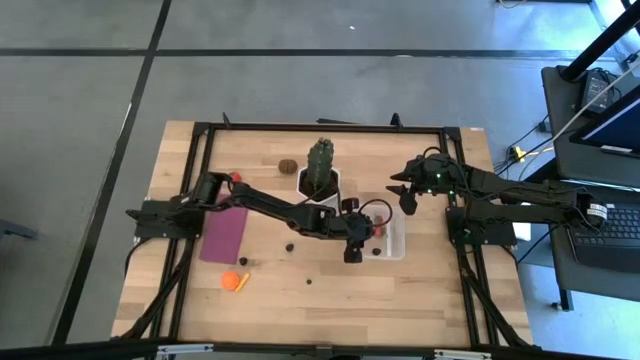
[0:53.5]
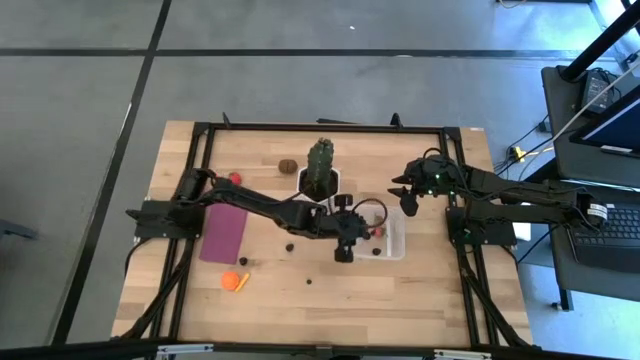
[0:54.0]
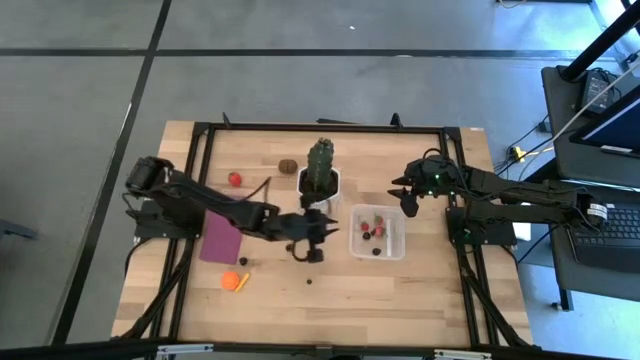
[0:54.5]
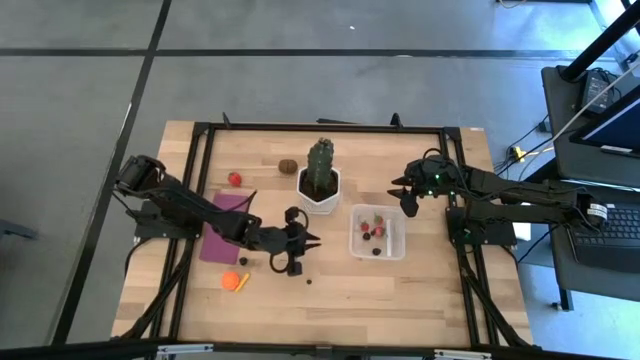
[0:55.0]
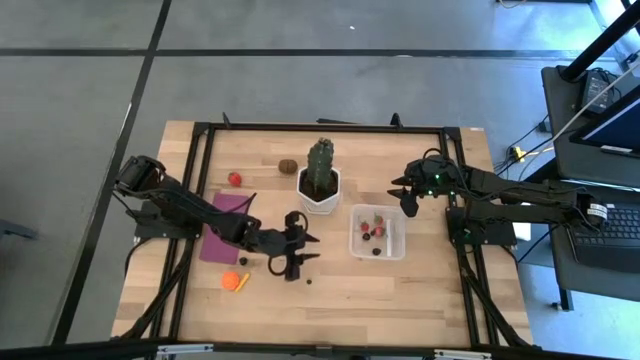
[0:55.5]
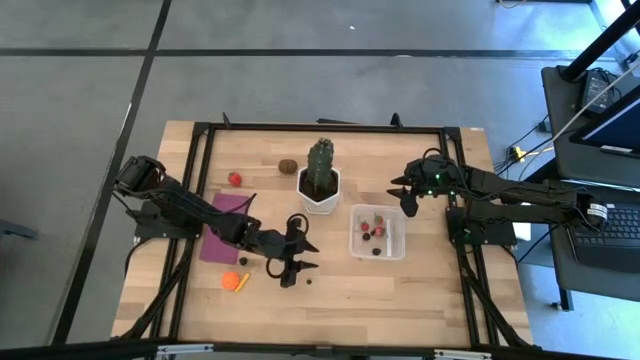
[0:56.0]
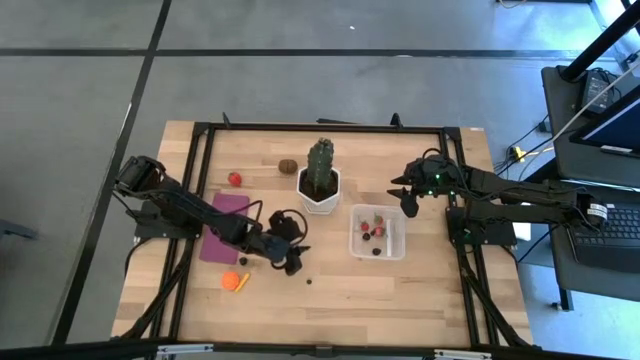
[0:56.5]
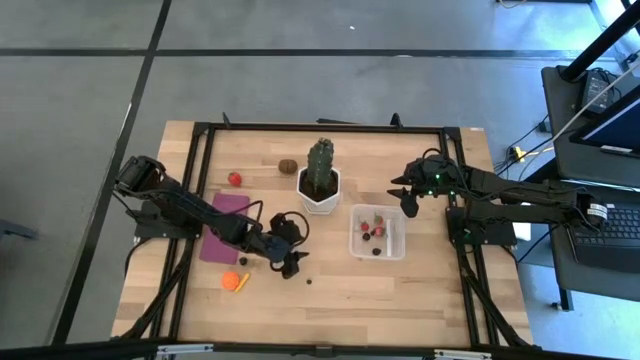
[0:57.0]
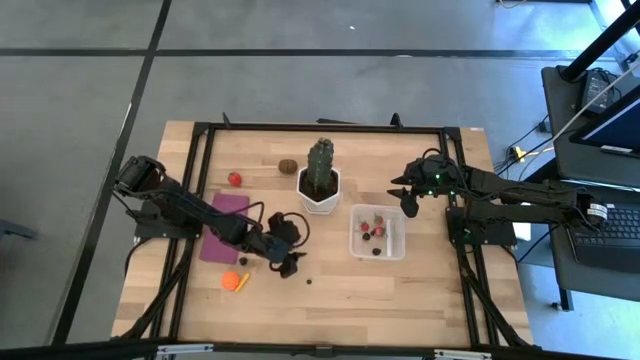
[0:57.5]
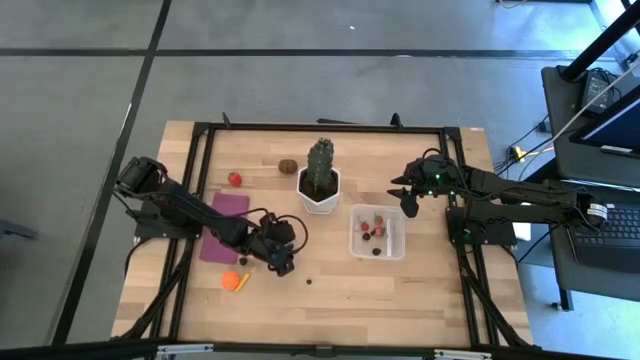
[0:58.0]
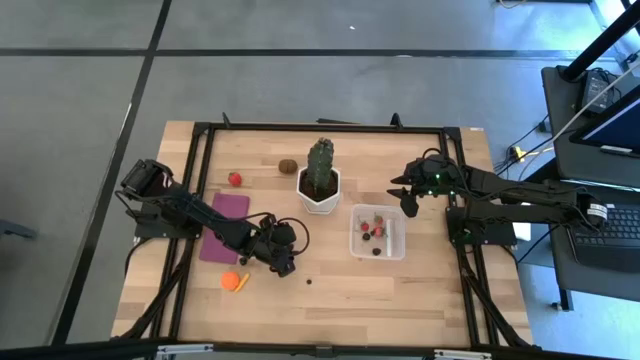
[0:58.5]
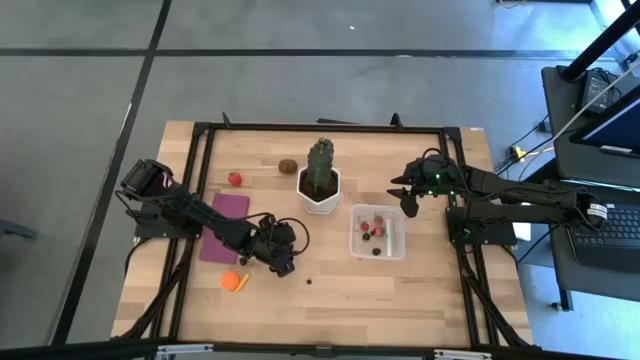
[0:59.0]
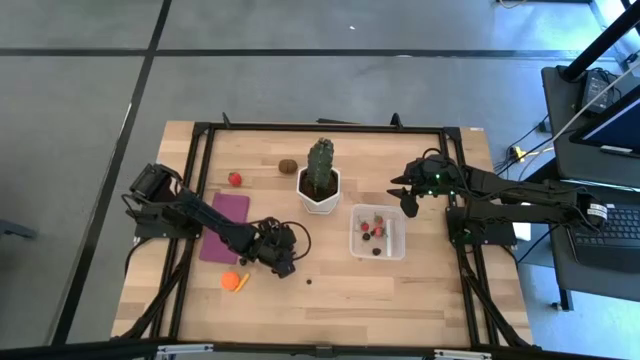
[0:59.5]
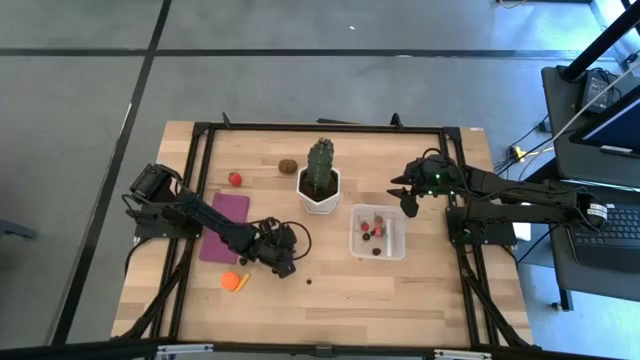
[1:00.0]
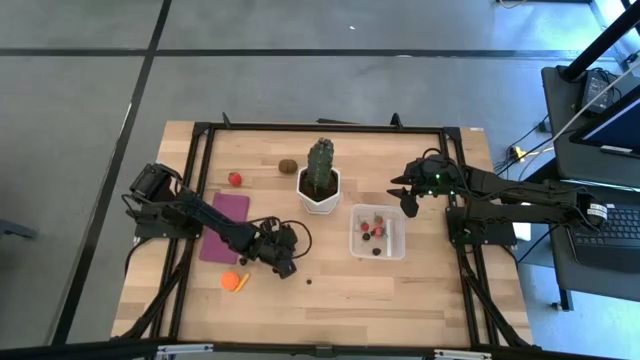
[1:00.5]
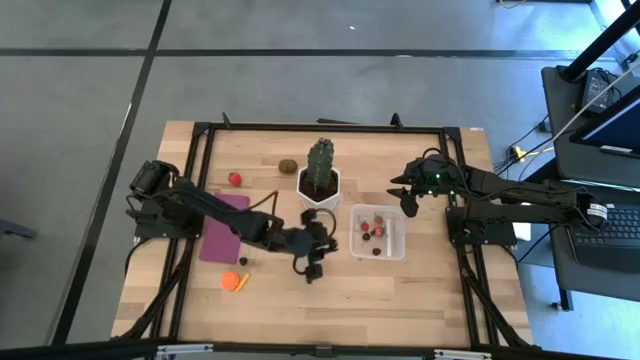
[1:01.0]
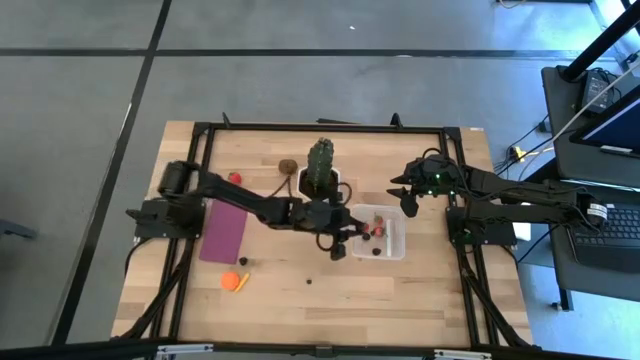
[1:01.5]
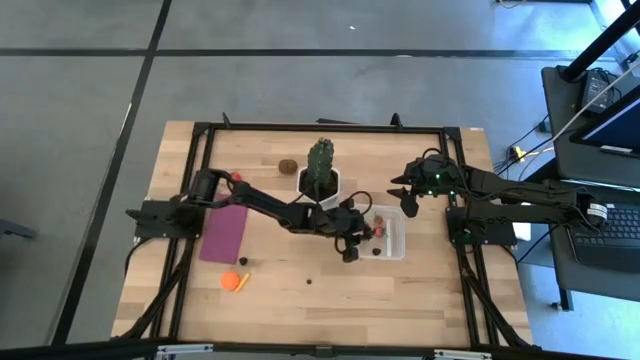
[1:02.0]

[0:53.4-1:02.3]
Task: Pick and placing Produce into tupperware
Put the blackberry into the transparent bin

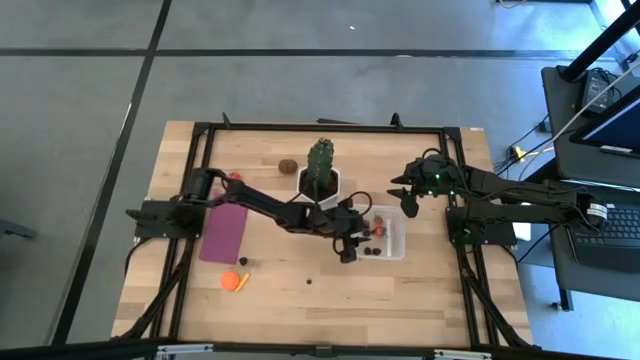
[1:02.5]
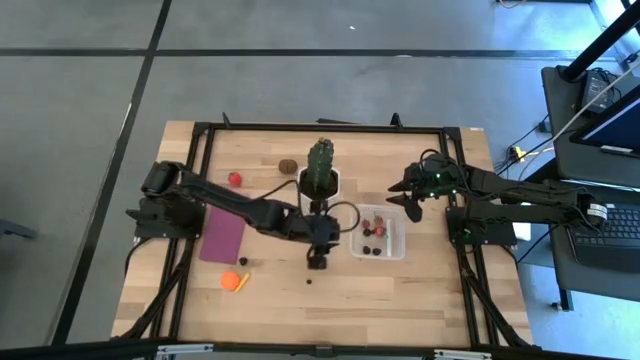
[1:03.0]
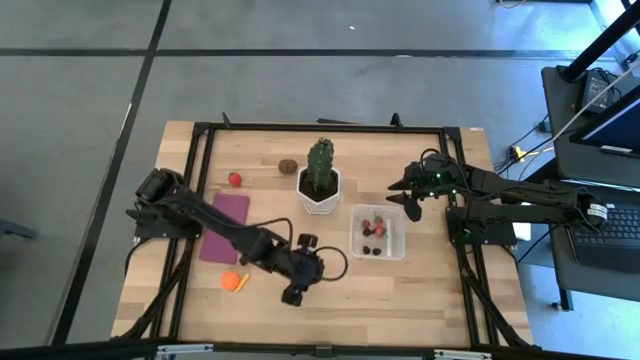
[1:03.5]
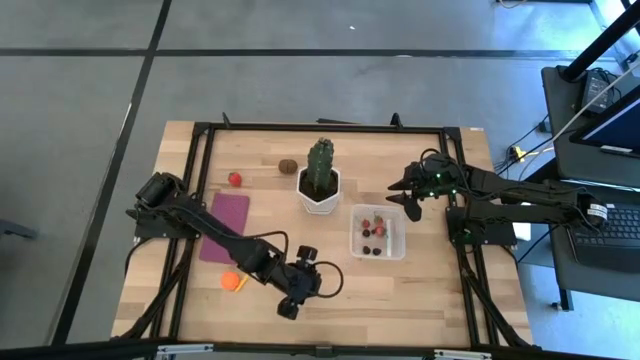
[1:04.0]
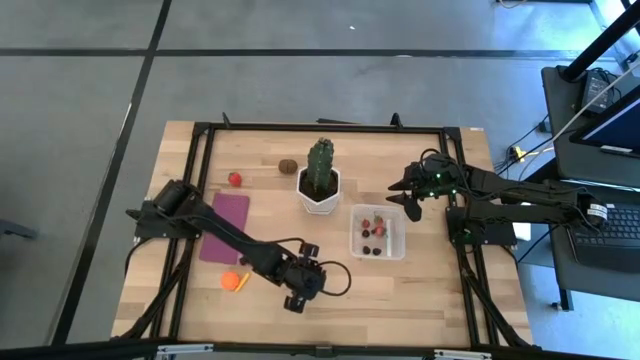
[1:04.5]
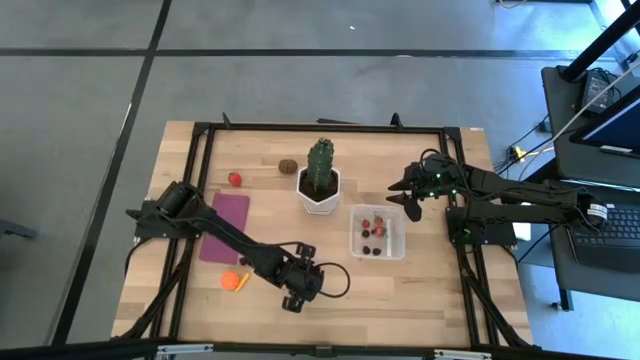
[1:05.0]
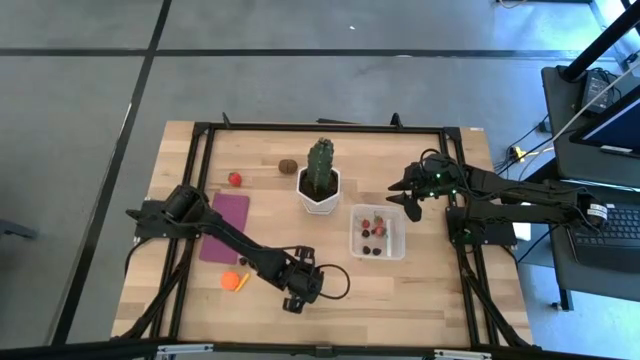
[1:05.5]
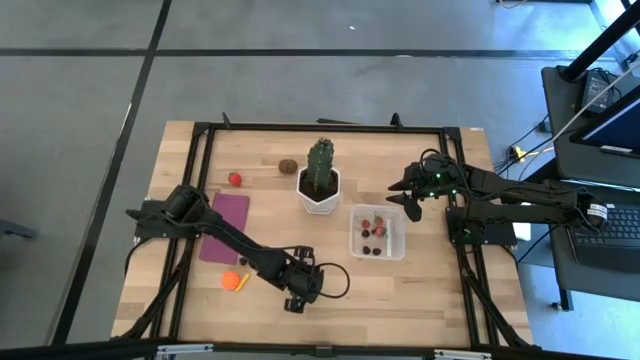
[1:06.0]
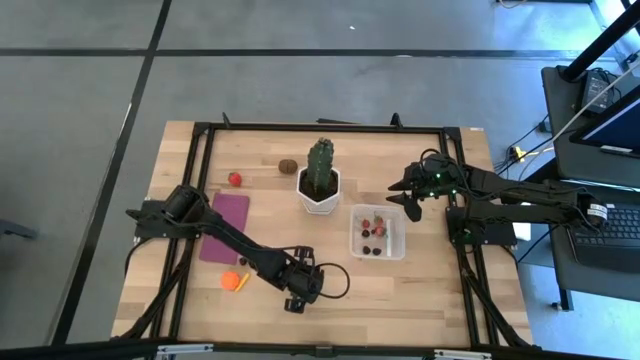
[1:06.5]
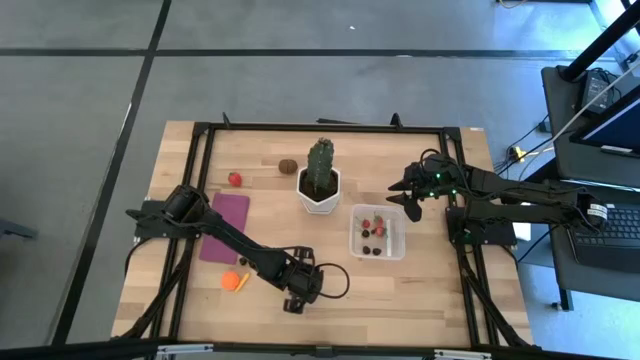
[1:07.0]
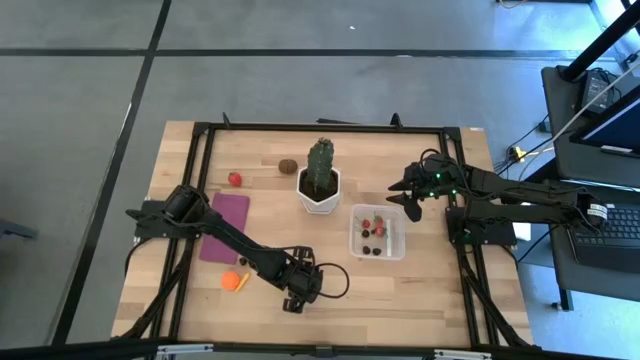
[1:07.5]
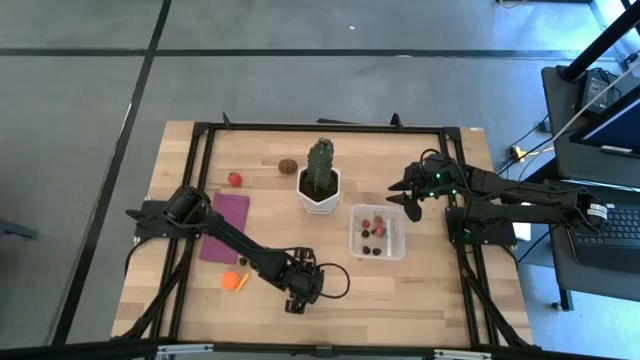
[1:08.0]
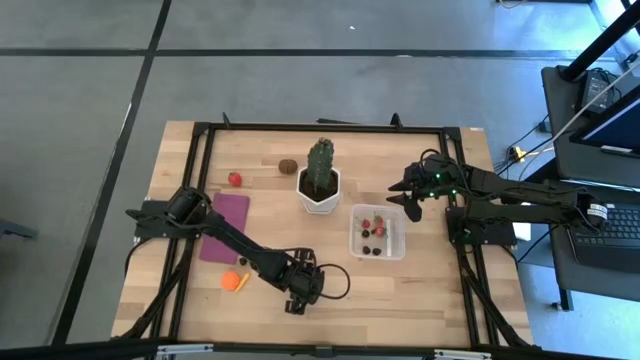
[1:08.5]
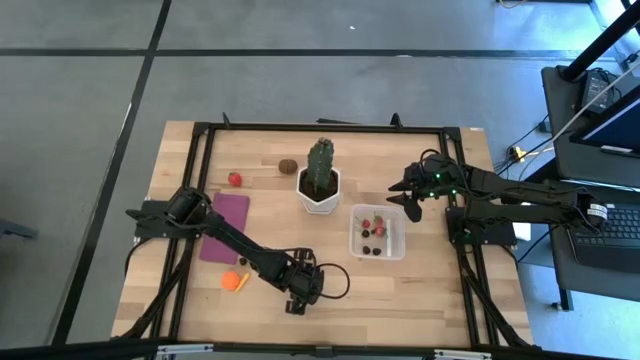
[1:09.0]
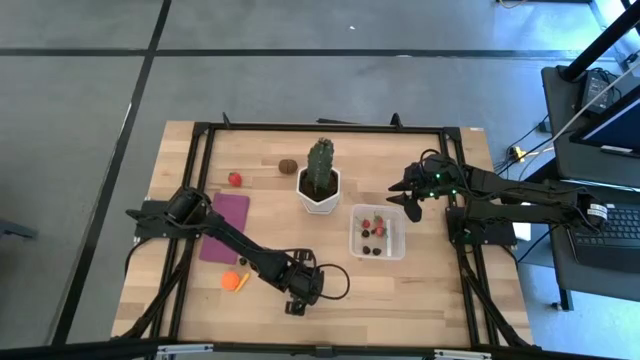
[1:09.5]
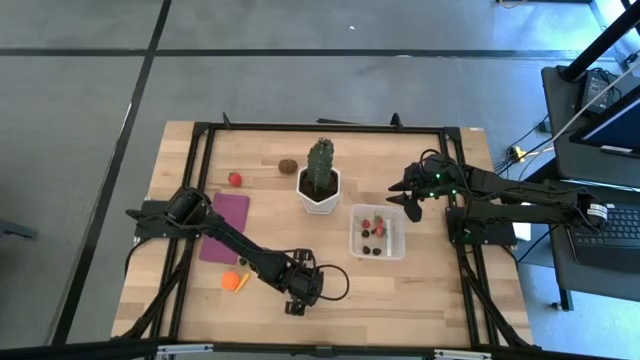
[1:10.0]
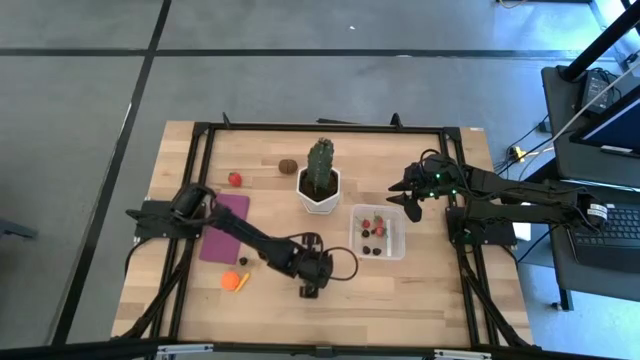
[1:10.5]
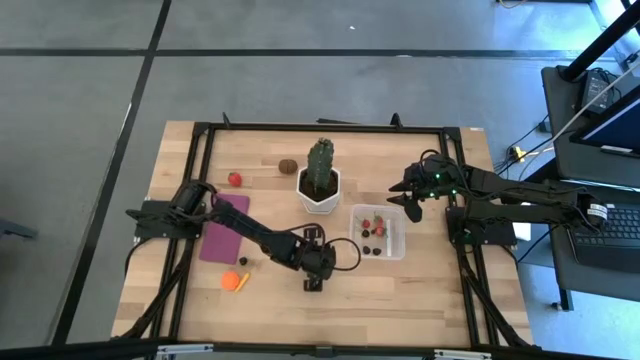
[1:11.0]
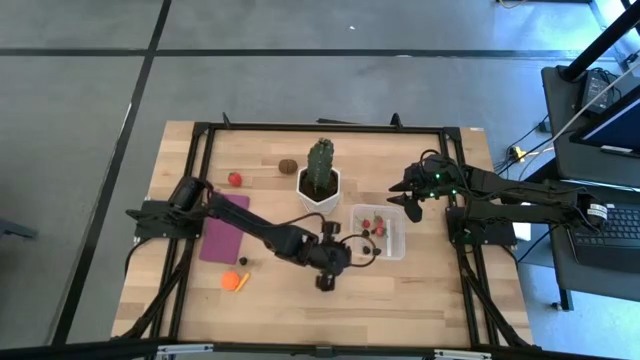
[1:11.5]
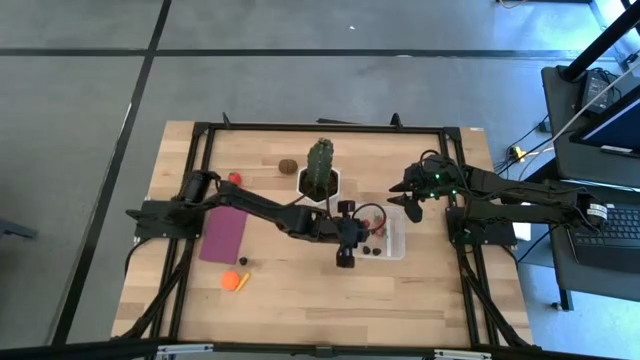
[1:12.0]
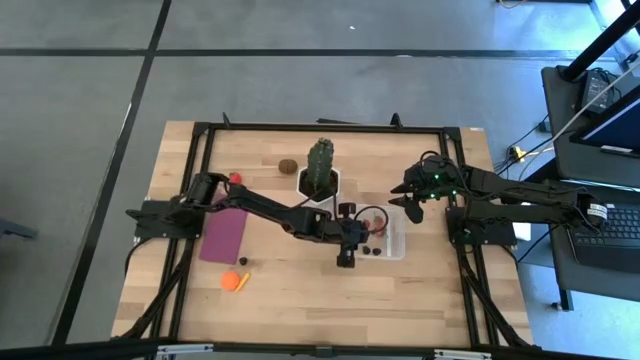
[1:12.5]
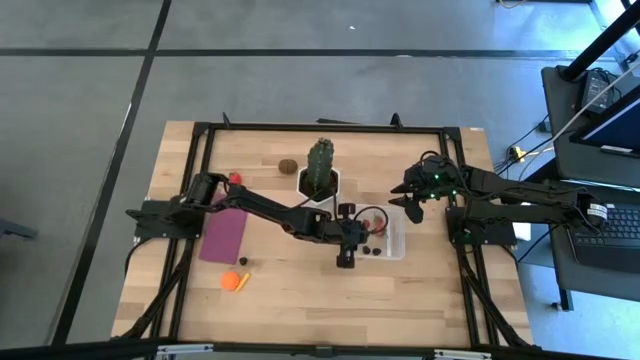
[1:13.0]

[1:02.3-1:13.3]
Put the blueberry into the transparent bin

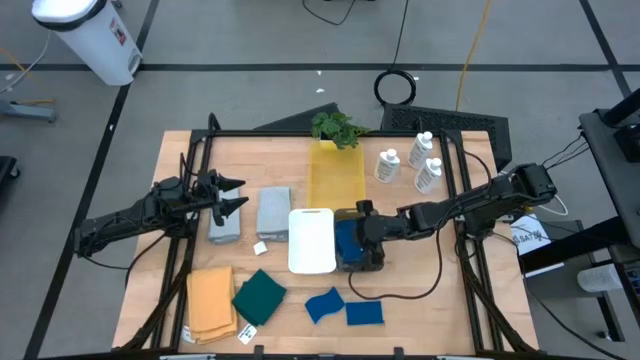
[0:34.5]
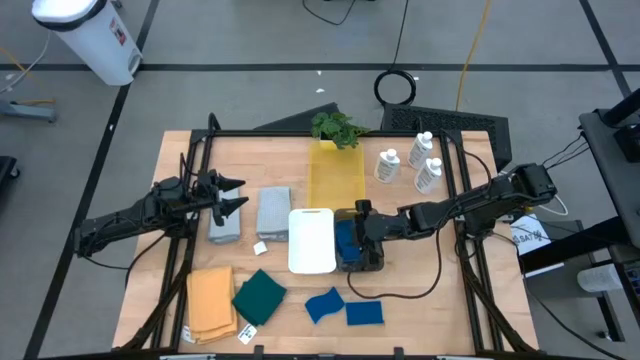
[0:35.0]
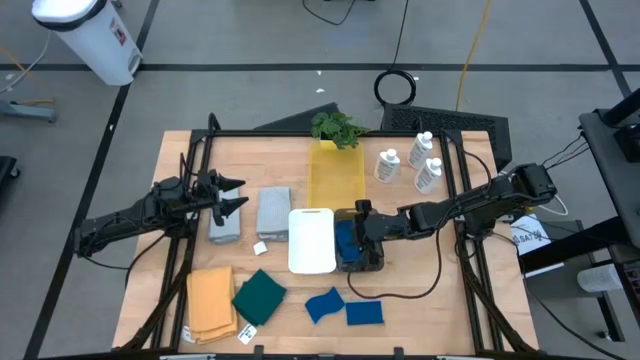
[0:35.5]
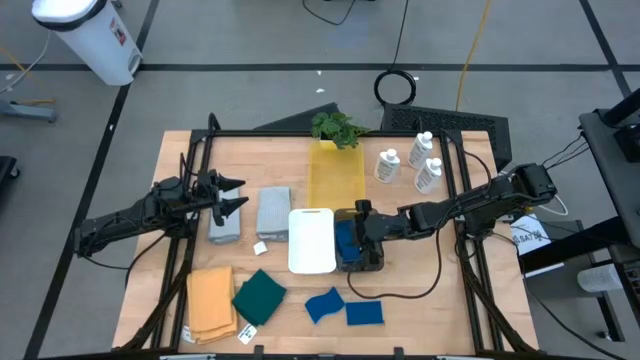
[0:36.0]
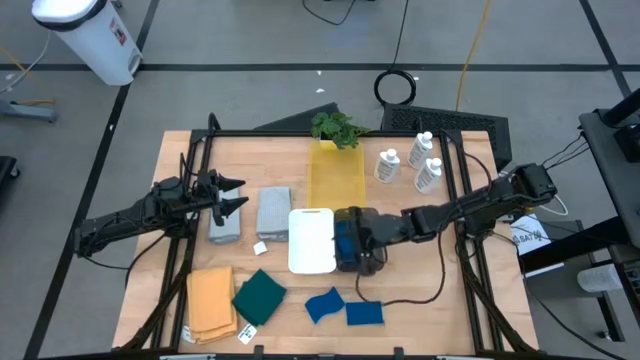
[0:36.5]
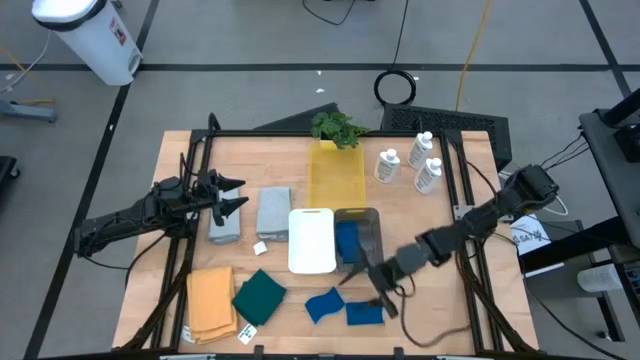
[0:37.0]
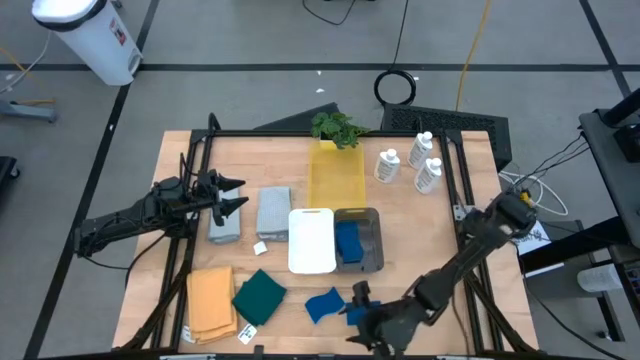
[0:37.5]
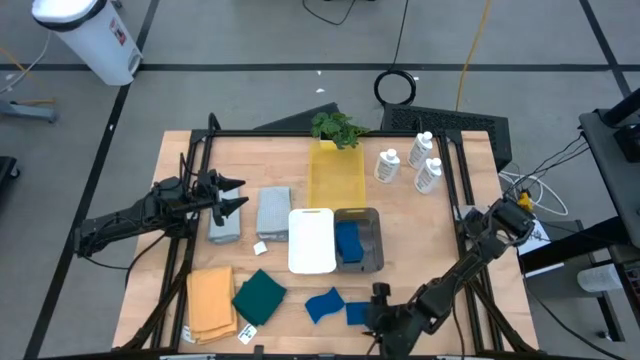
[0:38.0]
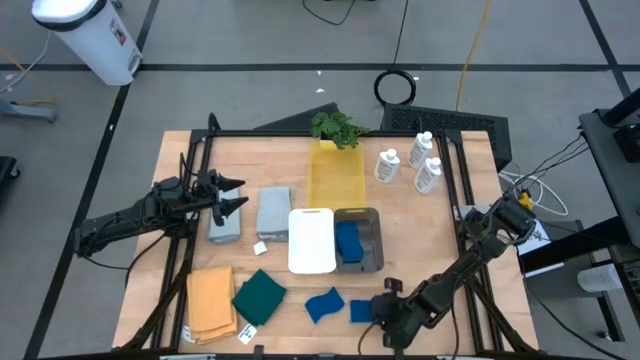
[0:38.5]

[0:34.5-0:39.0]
Task: Pick & Place Kitchen Items
Put the right sponge wipe into the black bin
